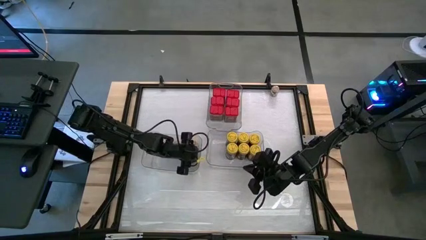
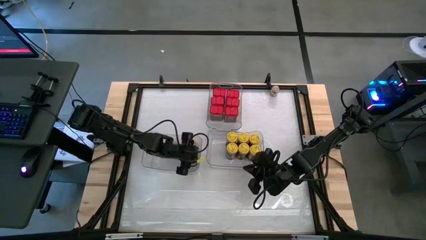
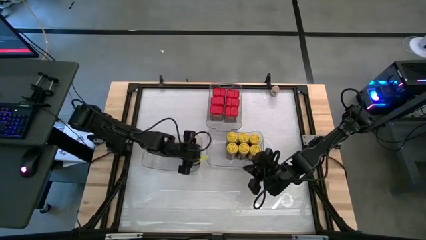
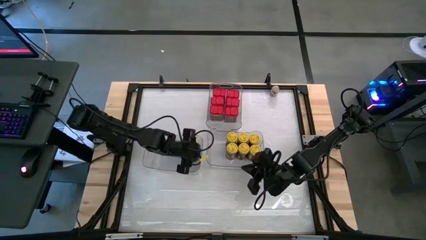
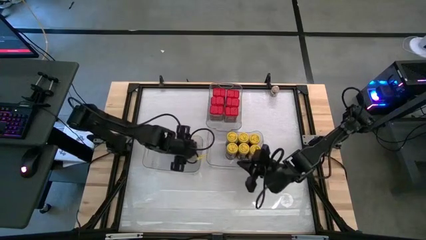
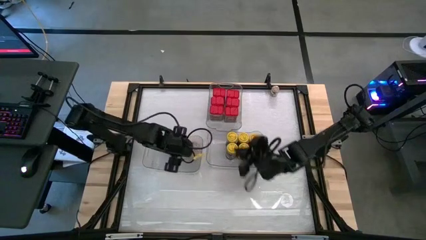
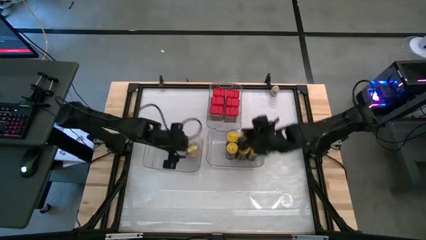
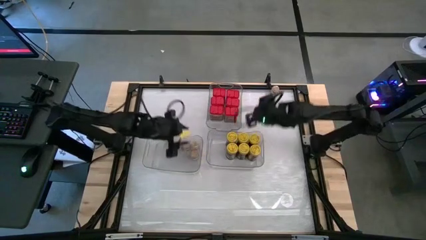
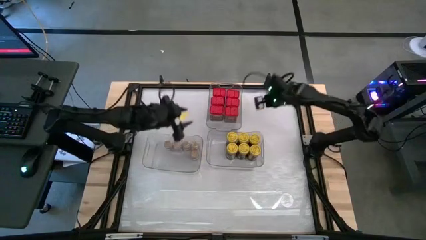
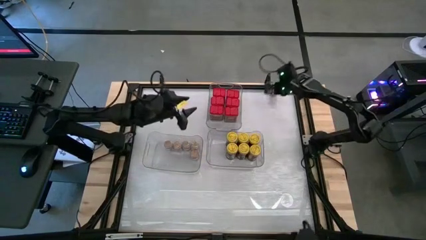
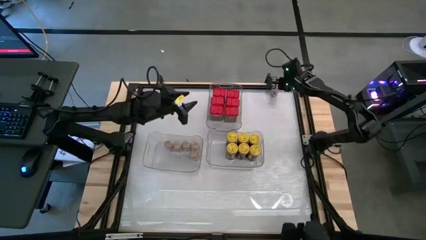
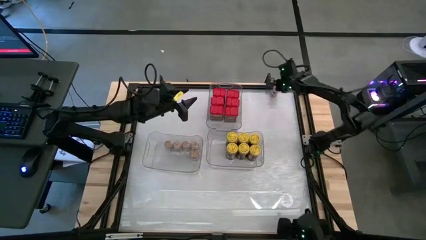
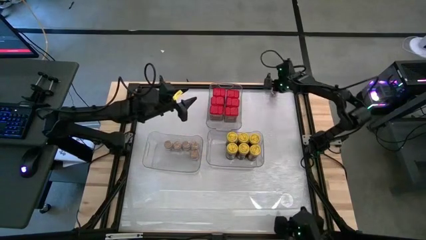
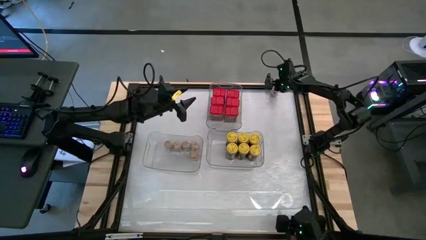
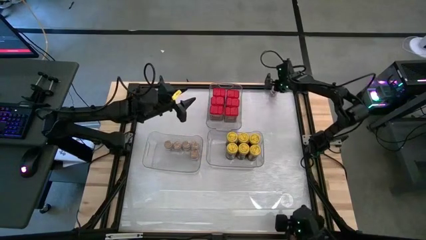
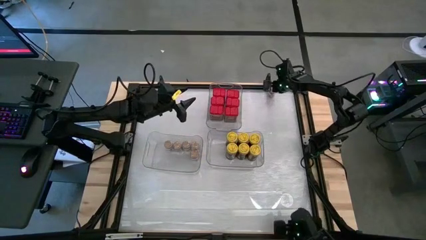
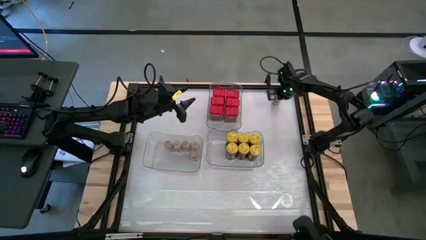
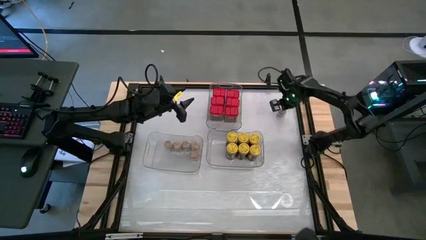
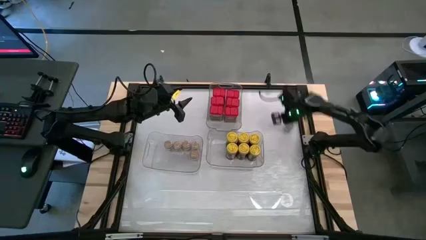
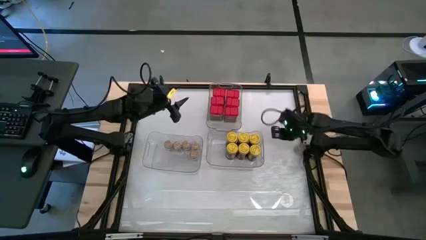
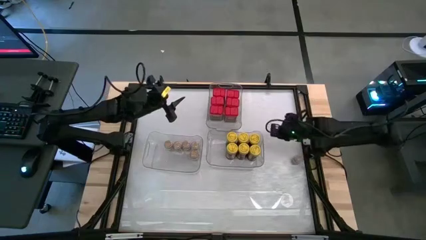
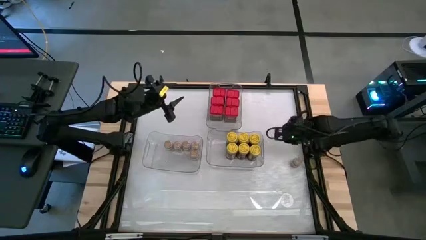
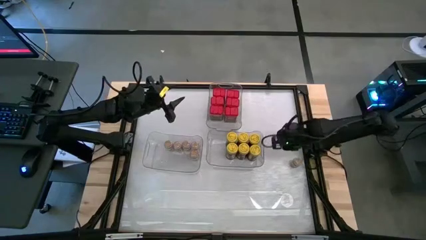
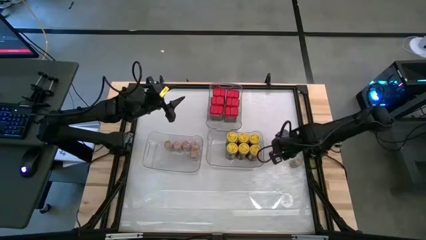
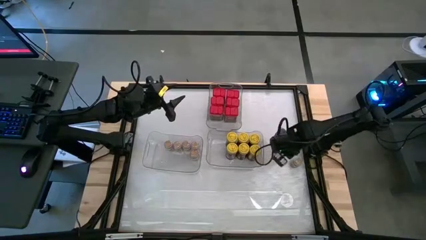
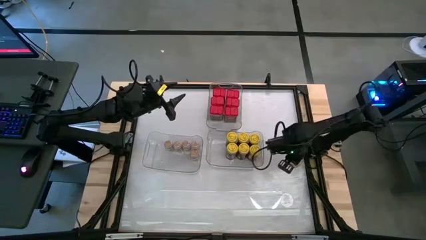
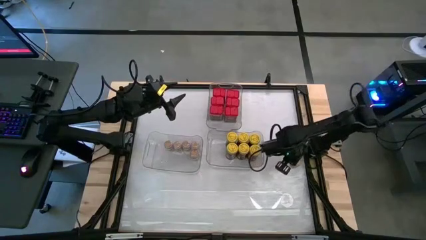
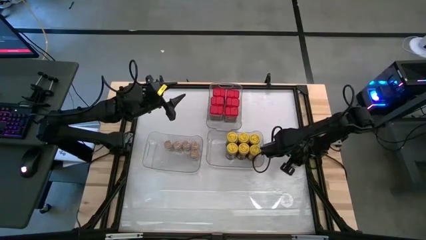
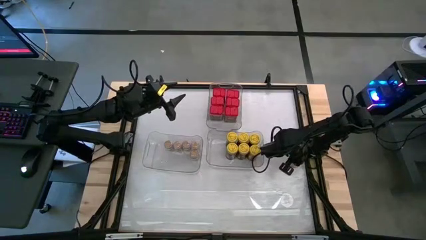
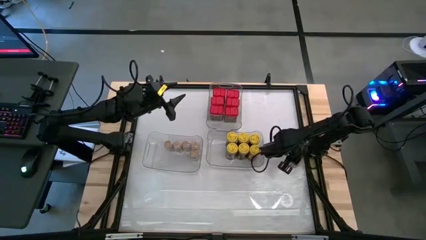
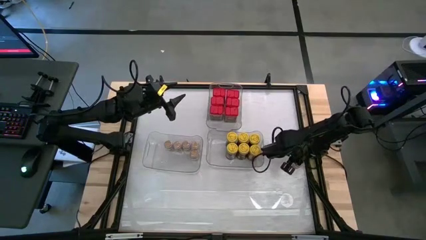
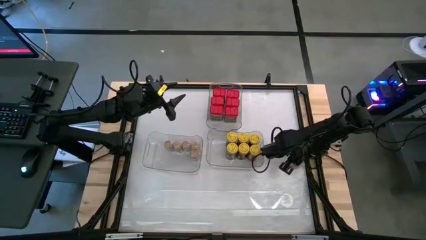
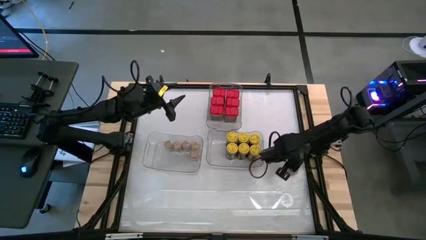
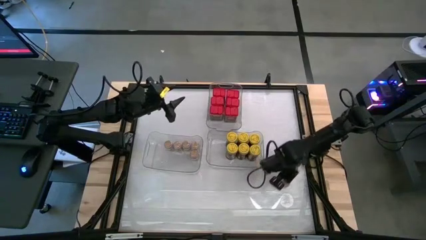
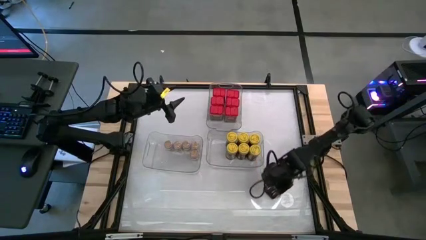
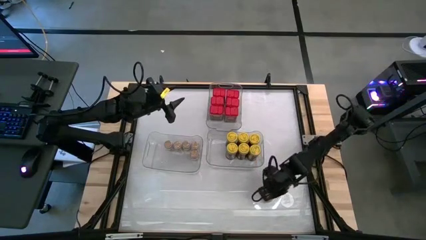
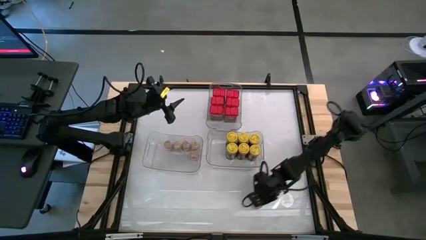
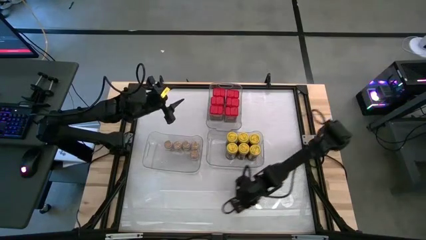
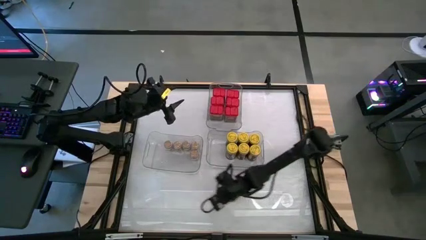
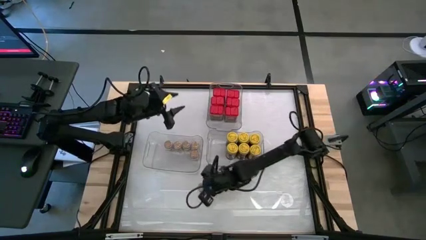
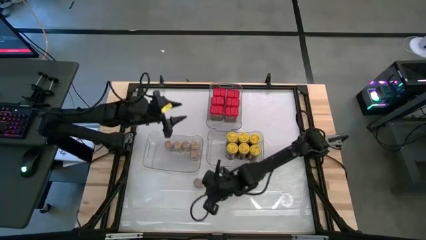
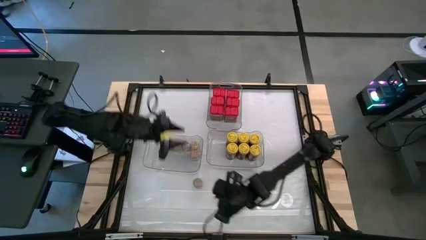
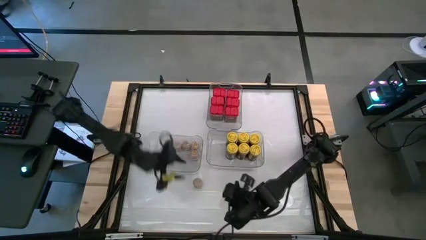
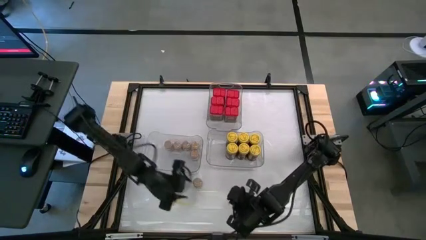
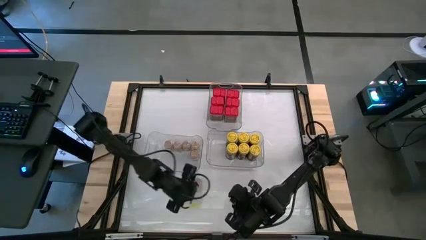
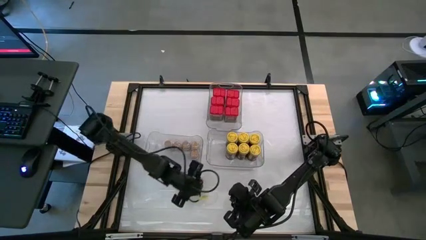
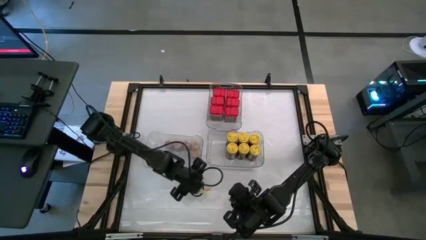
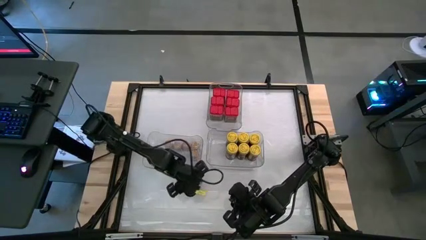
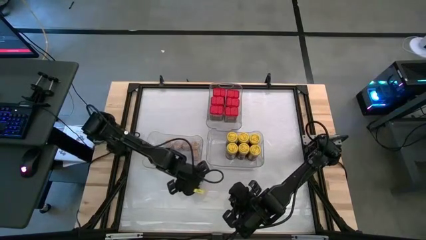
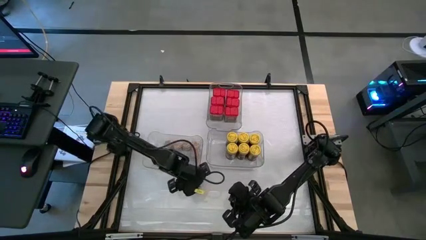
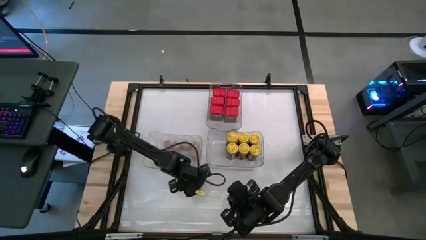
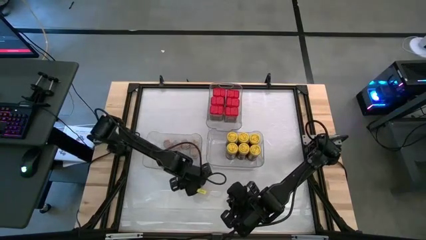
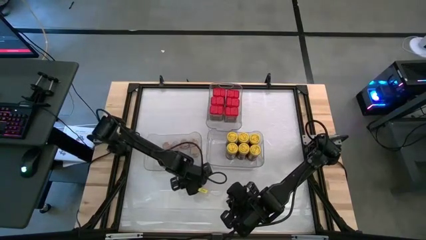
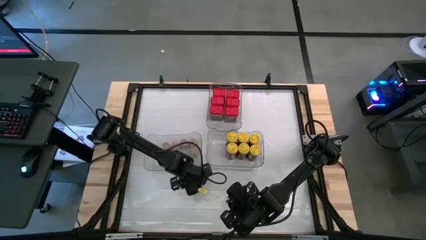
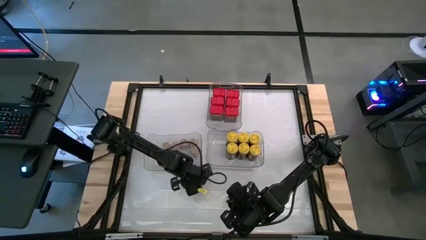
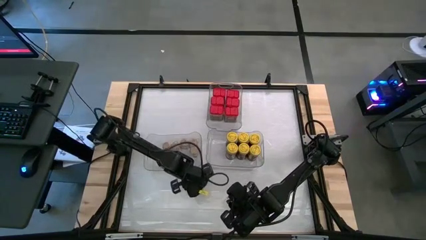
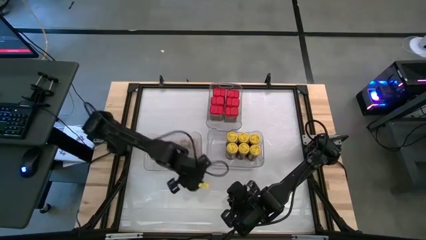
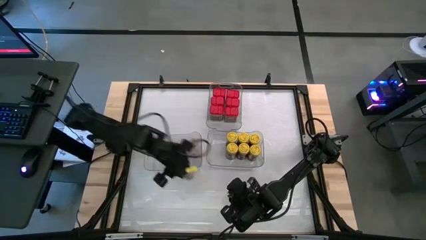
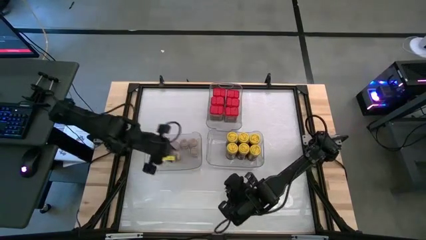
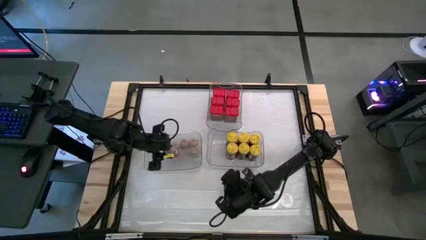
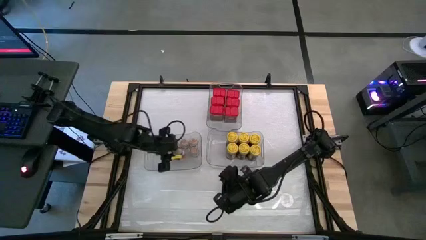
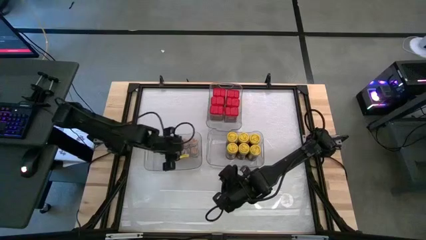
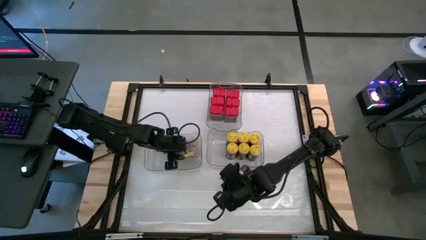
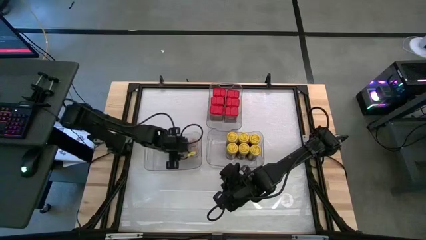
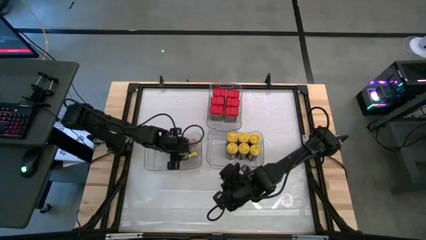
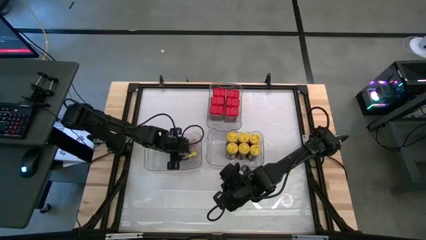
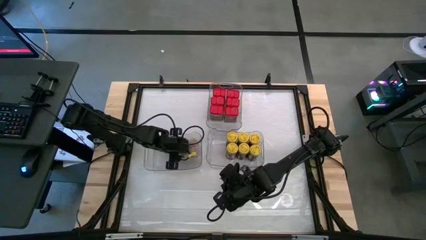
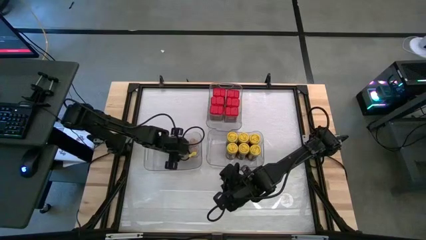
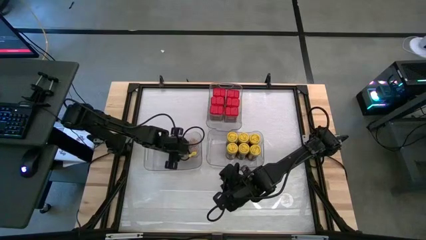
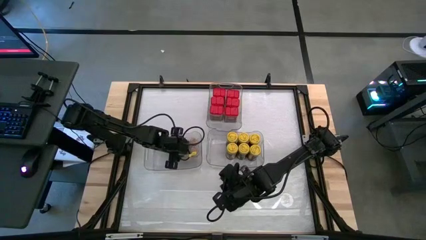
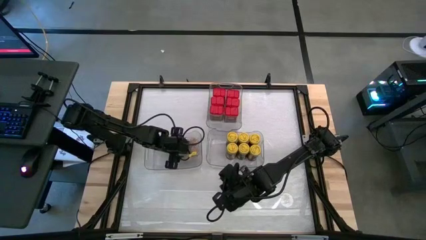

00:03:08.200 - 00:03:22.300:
Task: Sort spices by type
Put the brown seasoning bottle into the bottom left transparent bin

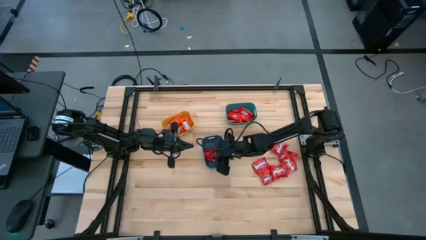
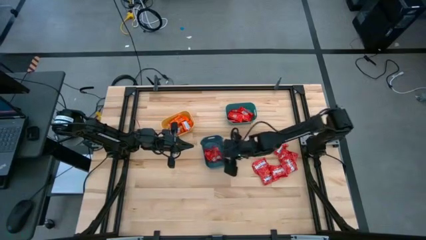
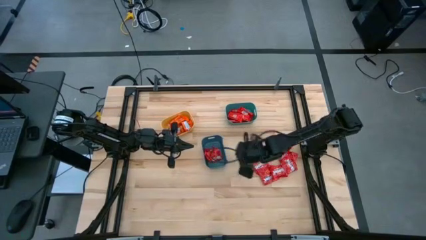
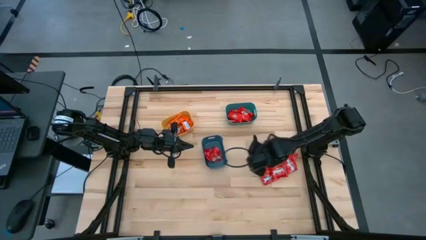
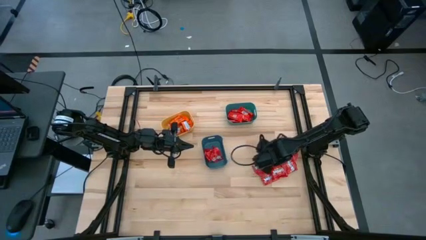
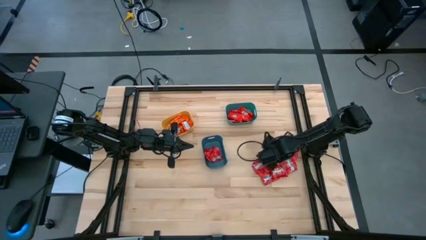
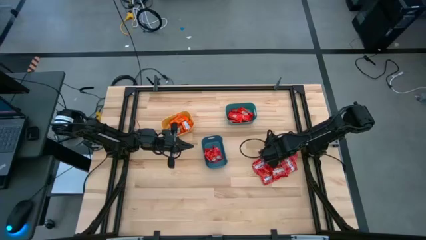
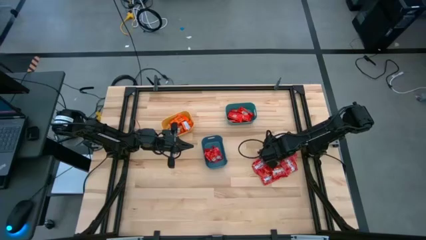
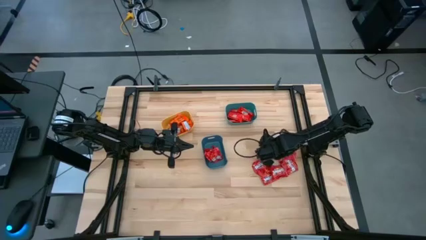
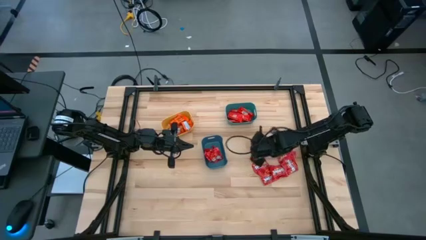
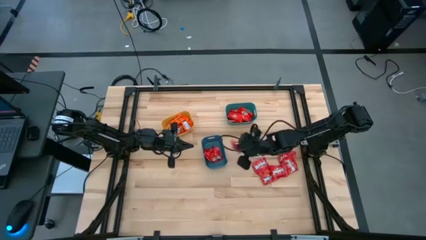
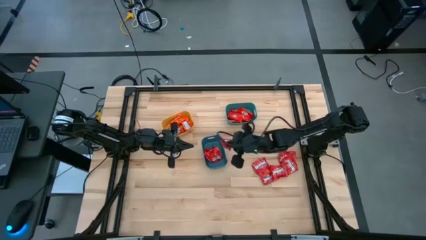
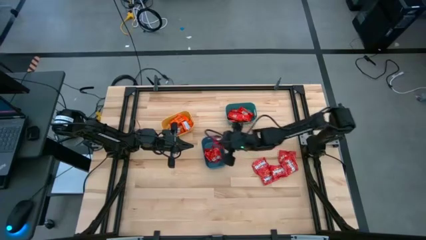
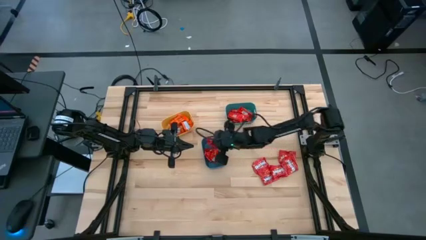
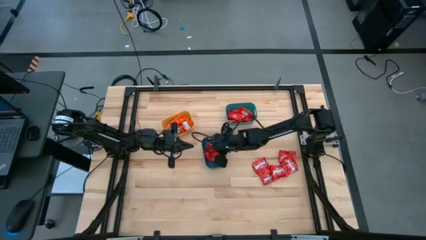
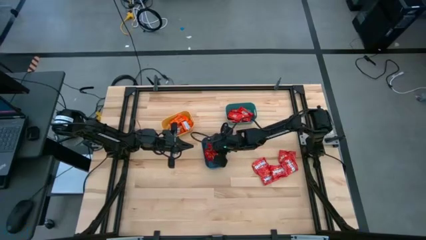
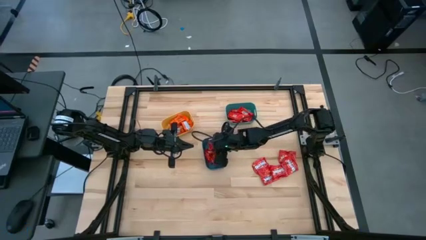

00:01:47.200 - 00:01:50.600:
Task: Sort candy
Put the red candy into the blue bin
